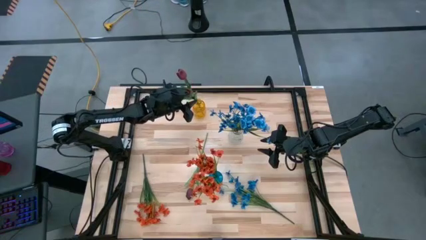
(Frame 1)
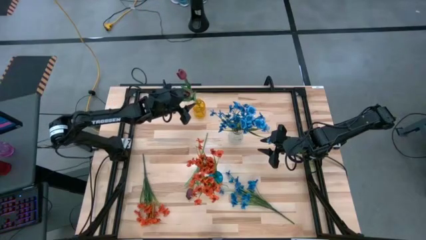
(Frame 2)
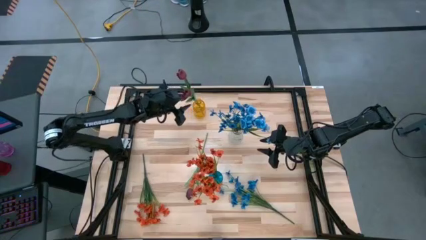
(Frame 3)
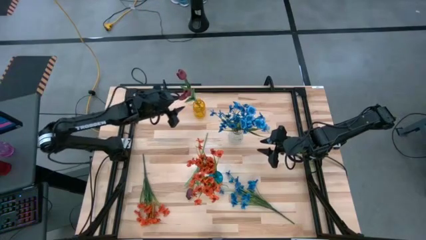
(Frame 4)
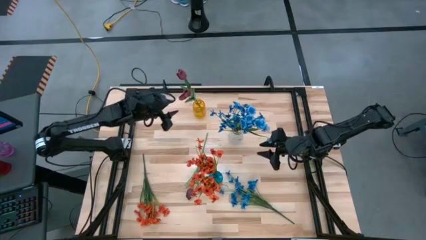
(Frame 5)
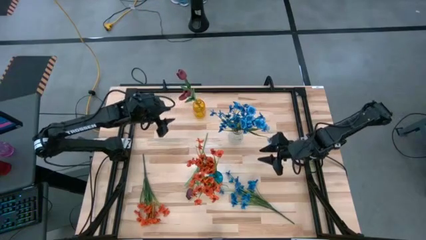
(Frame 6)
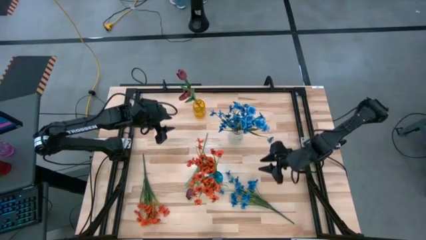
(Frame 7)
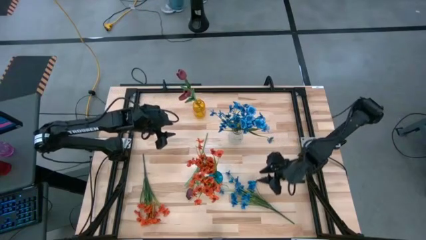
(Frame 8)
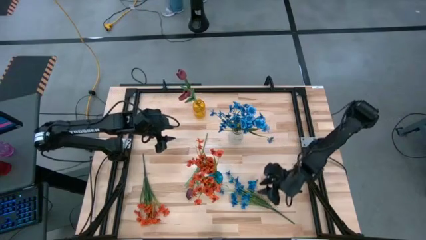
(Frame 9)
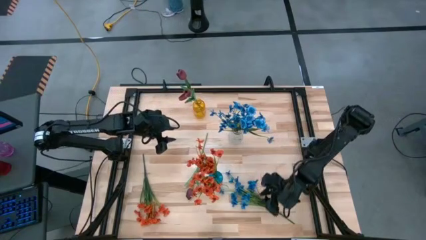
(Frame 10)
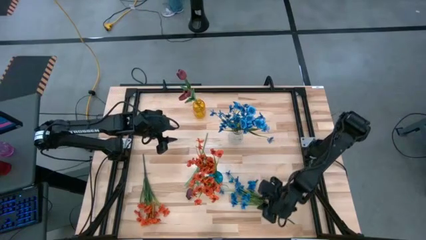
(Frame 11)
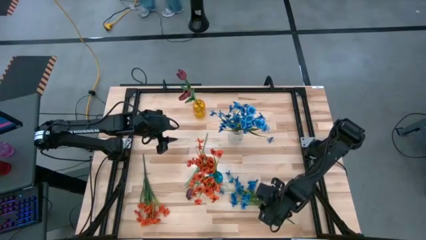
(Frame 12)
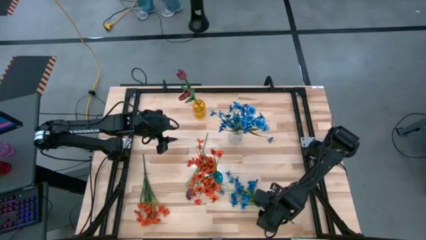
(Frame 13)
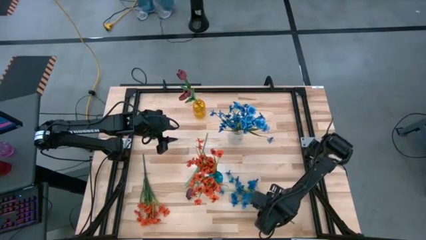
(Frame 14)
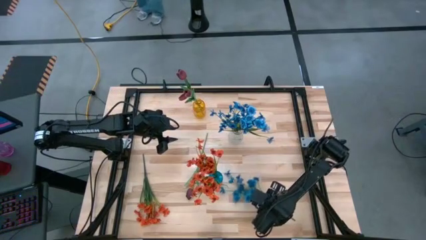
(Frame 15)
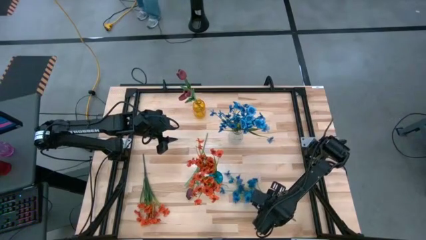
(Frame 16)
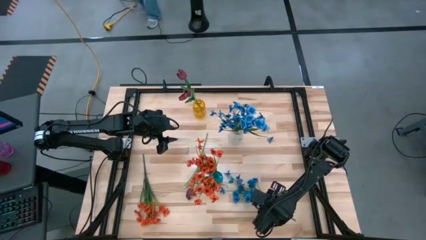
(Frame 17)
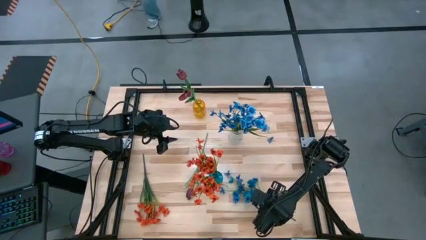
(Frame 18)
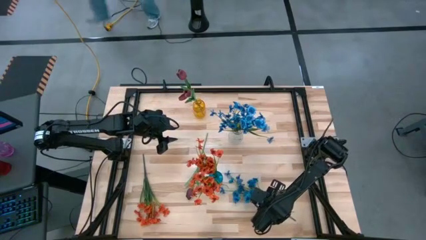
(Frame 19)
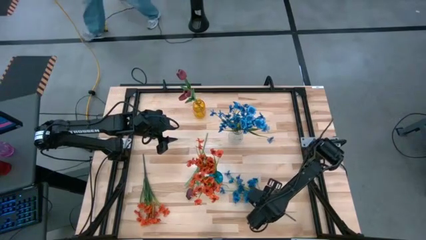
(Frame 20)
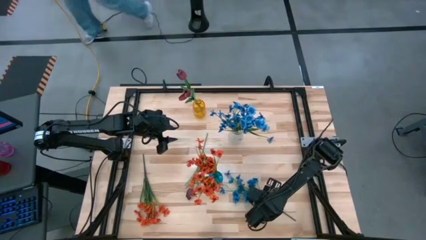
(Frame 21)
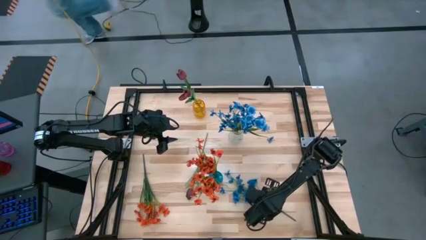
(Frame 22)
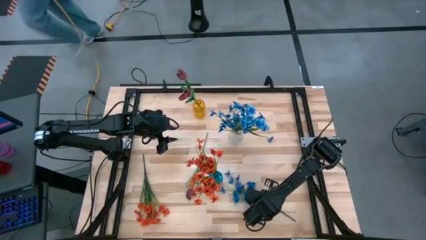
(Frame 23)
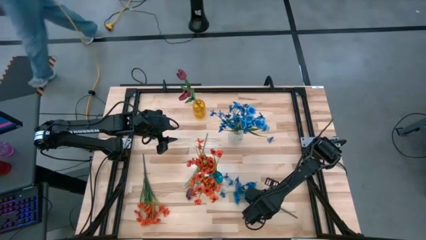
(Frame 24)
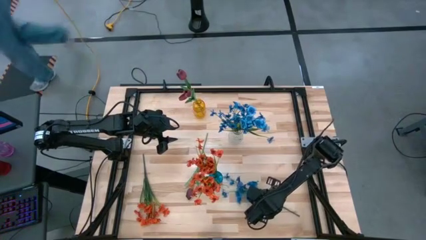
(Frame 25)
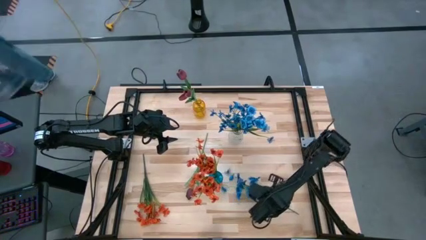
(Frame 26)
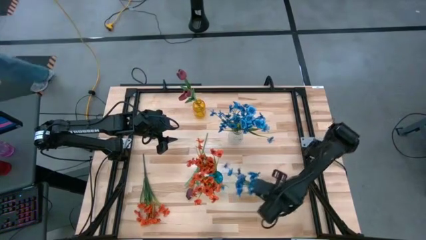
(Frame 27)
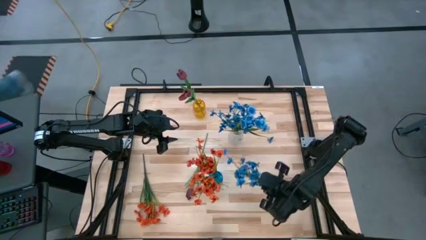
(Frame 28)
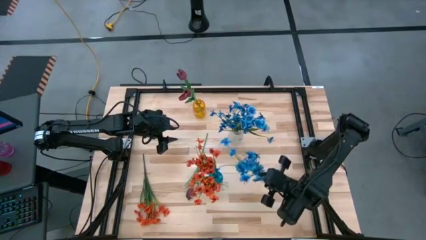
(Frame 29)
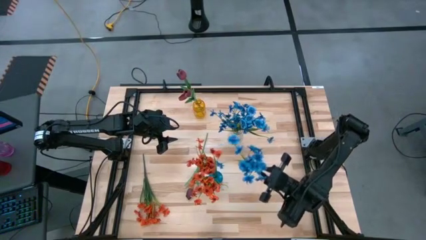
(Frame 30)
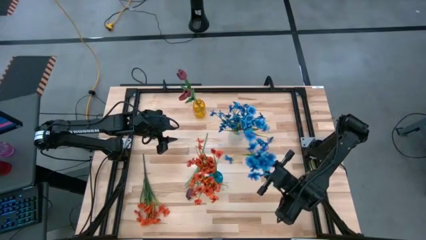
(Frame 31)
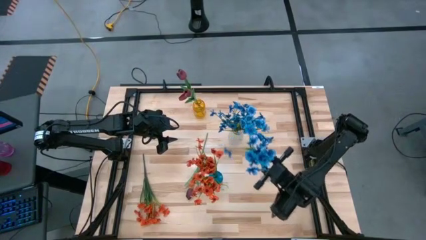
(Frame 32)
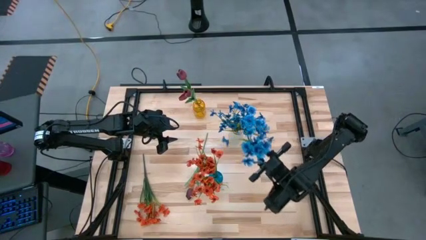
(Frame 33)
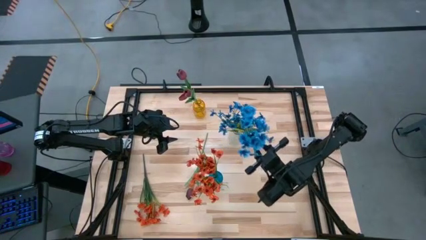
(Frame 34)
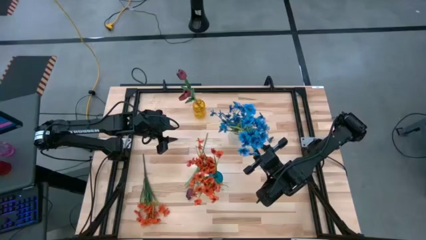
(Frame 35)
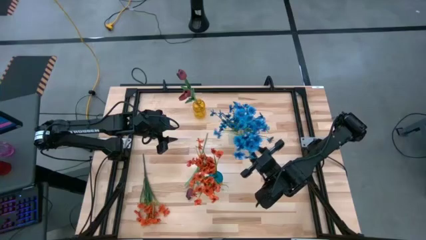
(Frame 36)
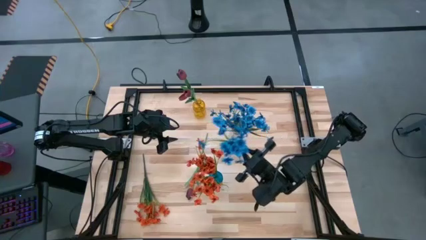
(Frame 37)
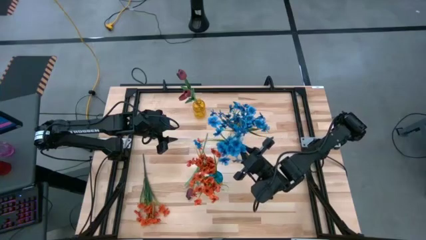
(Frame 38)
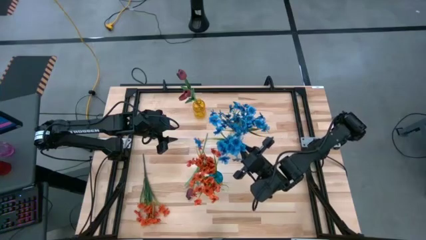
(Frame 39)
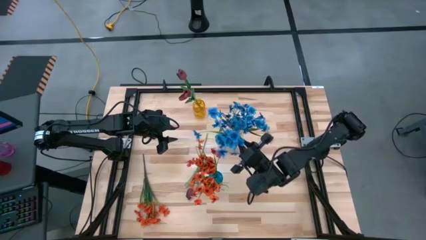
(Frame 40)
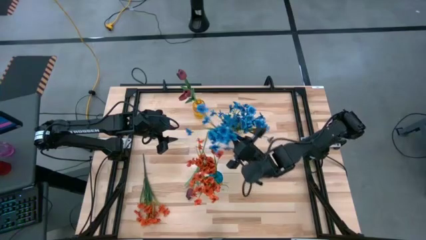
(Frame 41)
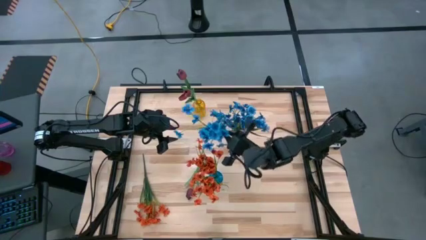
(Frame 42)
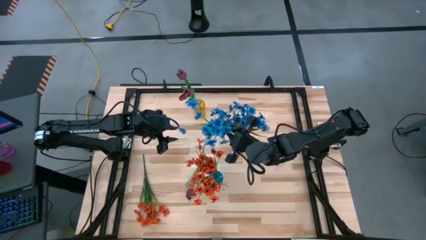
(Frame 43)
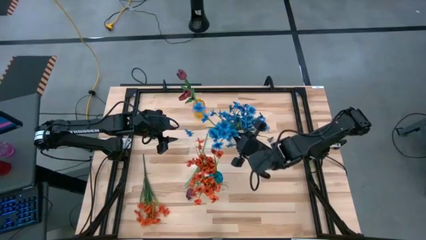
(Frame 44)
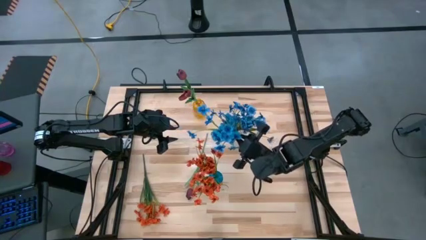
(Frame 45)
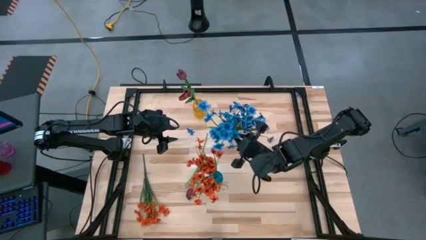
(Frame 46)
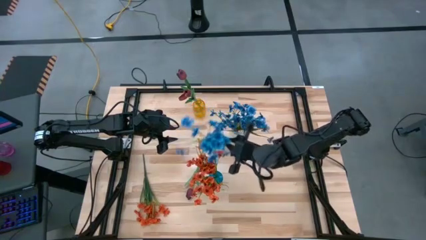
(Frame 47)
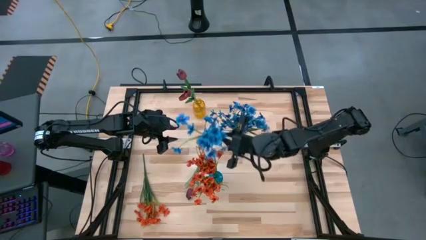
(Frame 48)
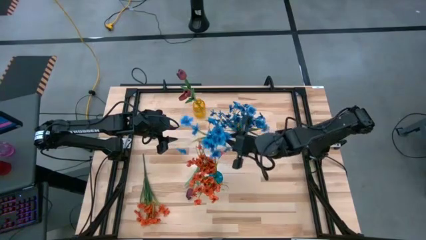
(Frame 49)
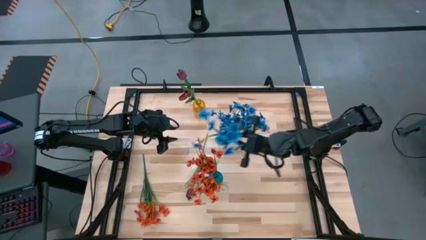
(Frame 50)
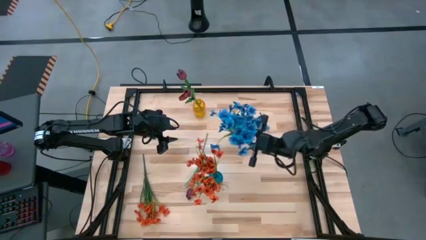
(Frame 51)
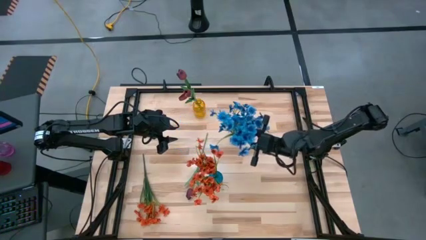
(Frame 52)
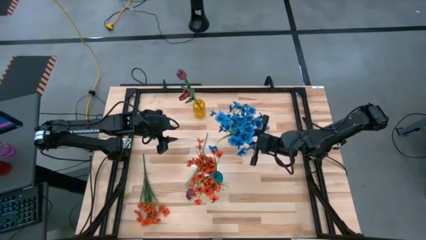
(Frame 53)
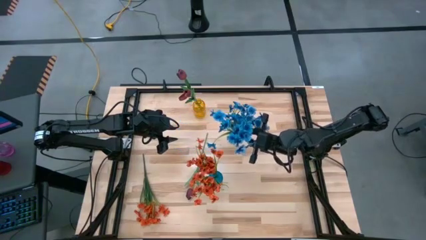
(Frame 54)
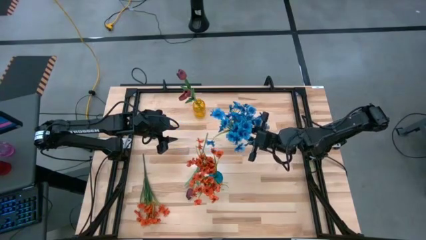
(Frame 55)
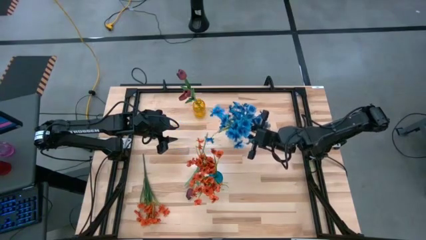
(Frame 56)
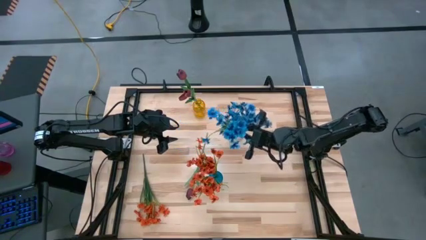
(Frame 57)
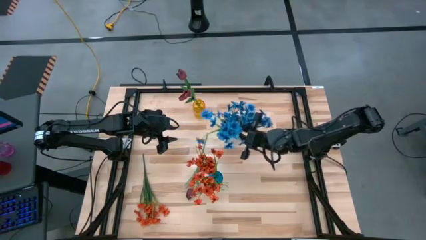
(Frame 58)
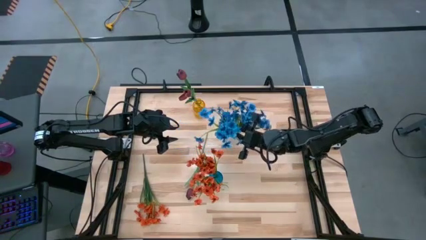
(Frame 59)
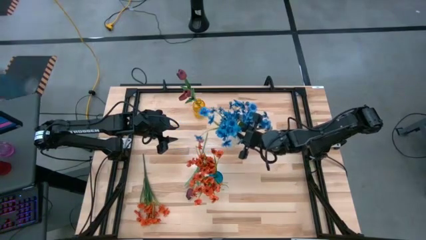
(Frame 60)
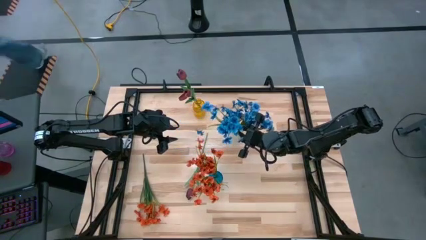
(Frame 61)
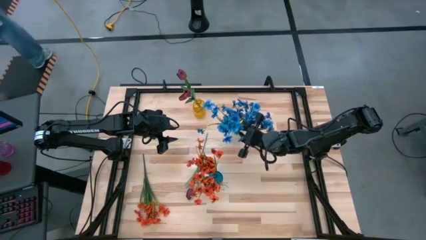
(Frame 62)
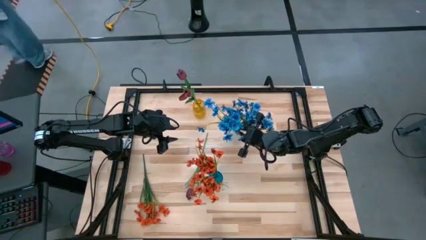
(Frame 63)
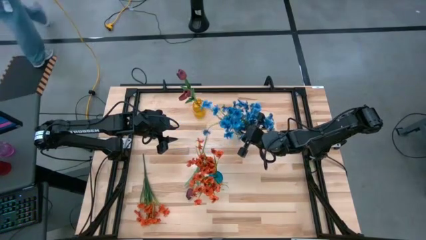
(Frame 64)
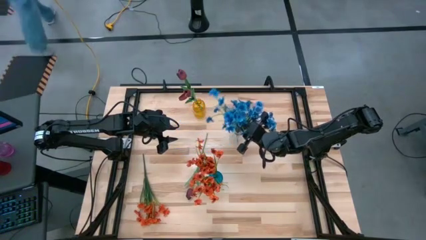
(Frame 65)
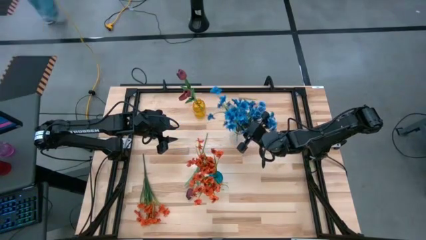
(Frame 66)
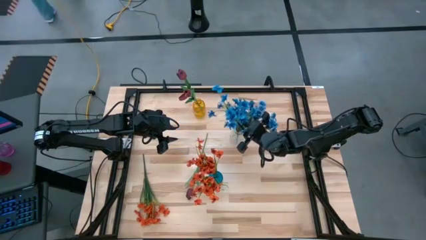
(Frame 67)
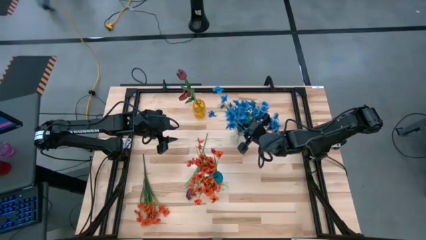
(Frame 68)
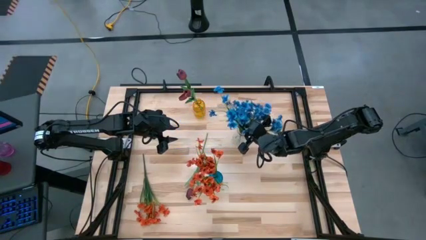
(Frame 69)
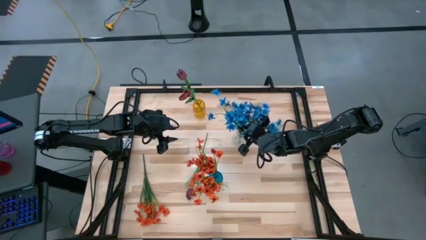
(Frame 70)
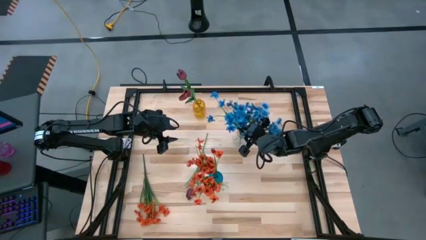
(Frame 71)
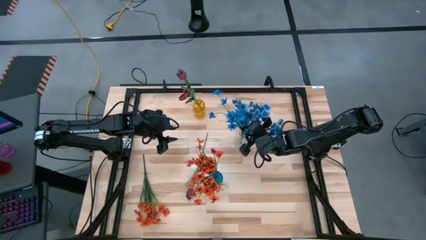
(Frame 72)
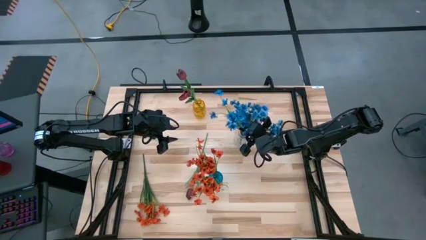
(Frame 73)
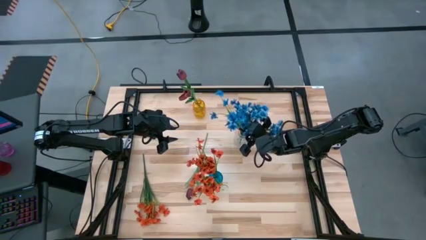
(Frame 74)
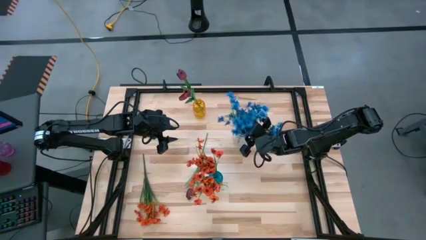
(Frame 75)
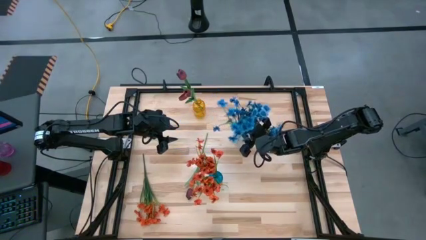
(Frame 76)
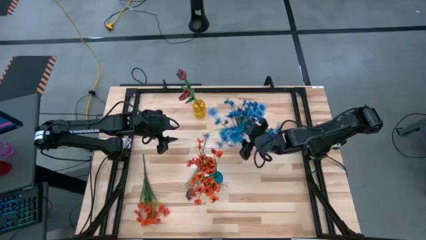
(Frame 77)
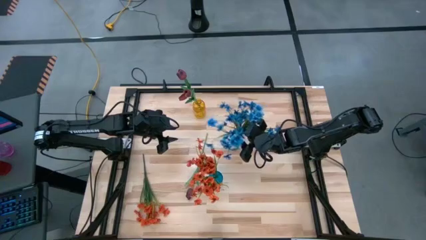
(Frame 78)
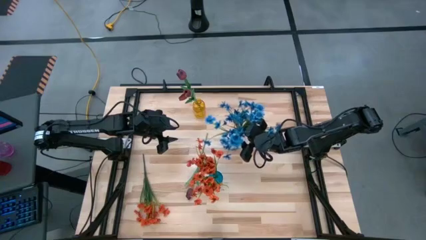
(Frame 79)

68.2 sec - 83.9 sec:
Task: Sort flowers into vase by color
Put the blue flowers into the transparent vase

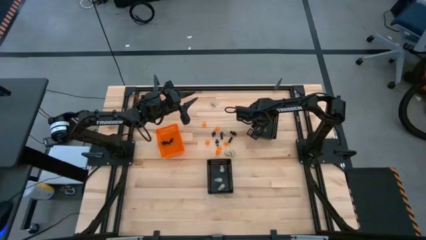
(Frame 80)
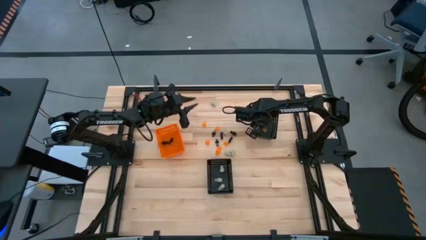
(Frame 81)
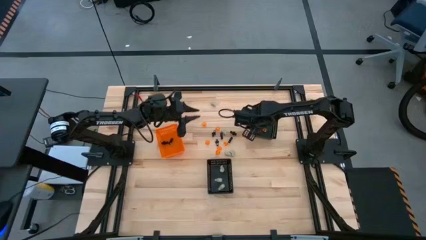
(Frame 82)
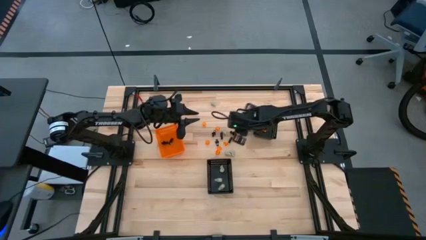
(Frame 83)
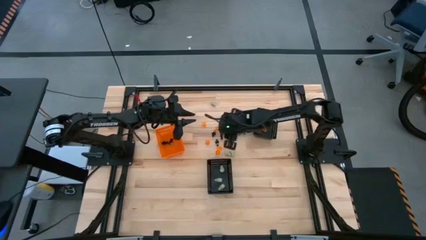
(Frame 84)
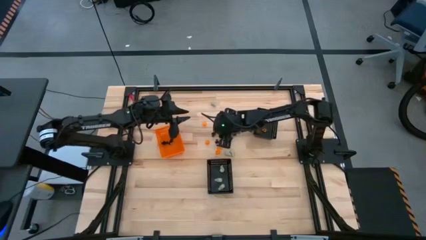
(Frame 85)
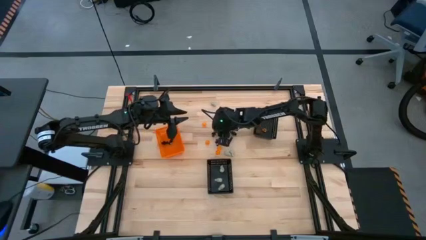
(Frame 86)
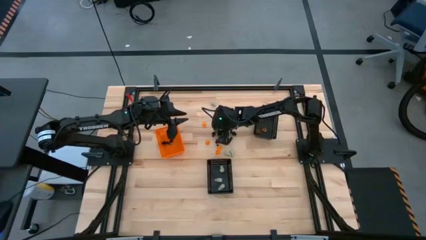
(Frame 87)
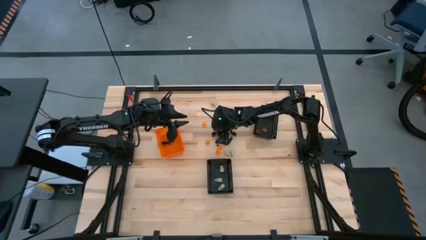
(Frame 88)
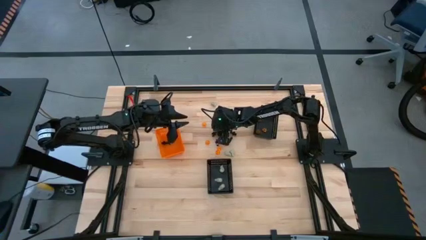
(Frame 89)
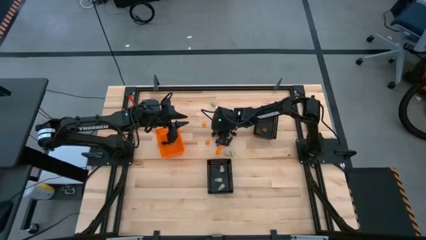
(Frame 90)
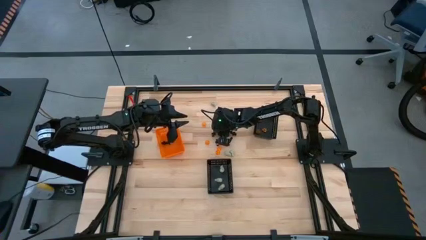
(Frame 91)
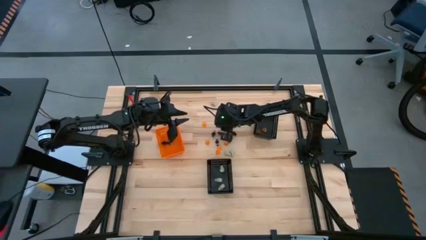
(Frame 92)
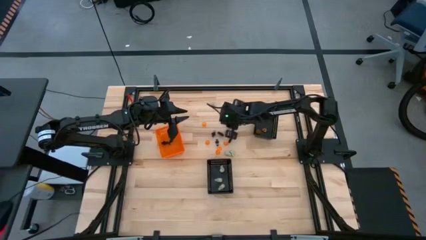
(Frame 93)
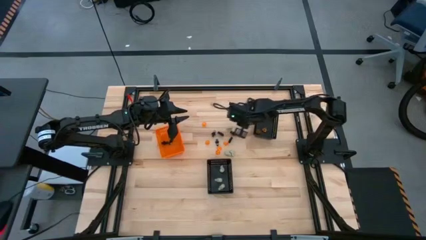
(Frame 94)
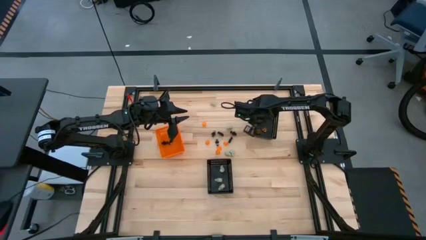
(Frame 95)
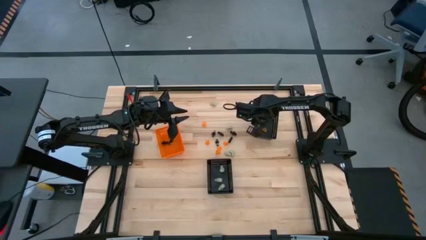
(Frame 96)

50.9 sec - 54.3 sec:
Task: Sort Halloween decoration
Put the orange pumpkin toy into the top black bin
